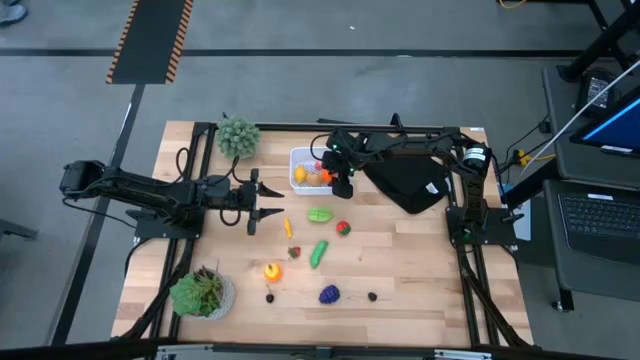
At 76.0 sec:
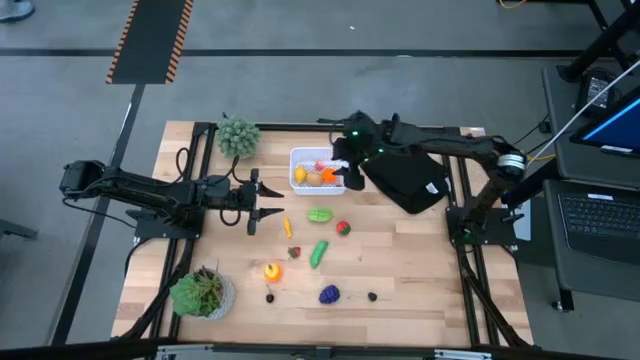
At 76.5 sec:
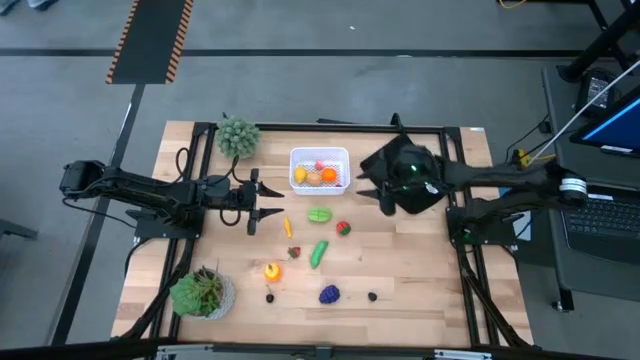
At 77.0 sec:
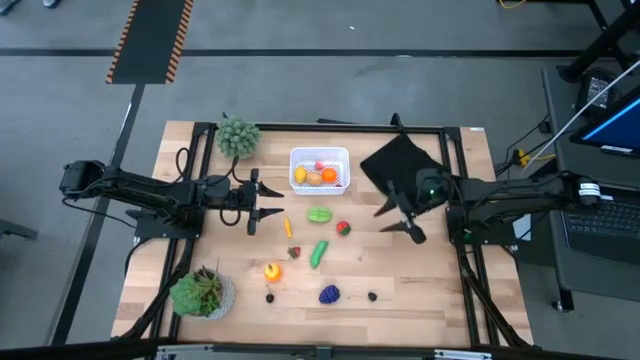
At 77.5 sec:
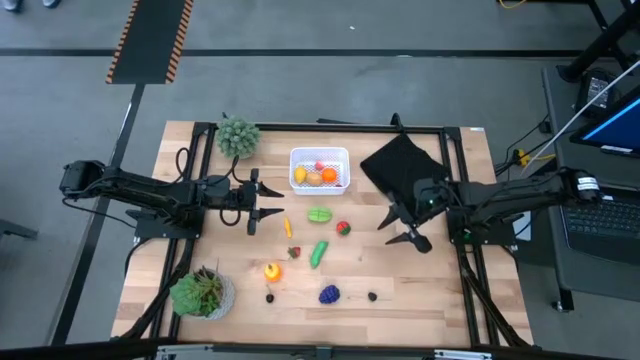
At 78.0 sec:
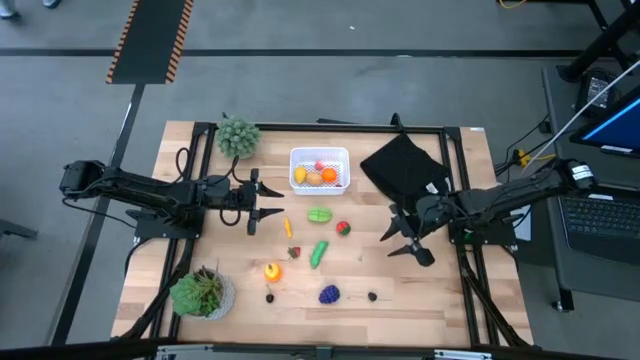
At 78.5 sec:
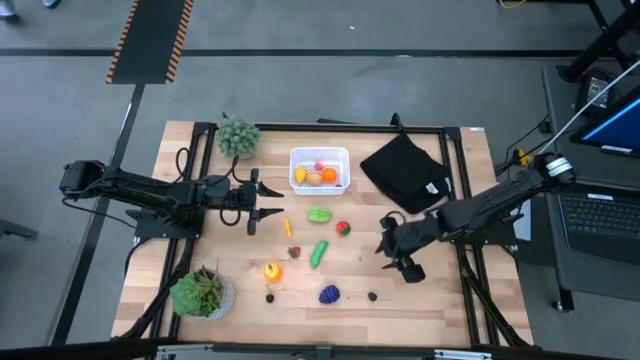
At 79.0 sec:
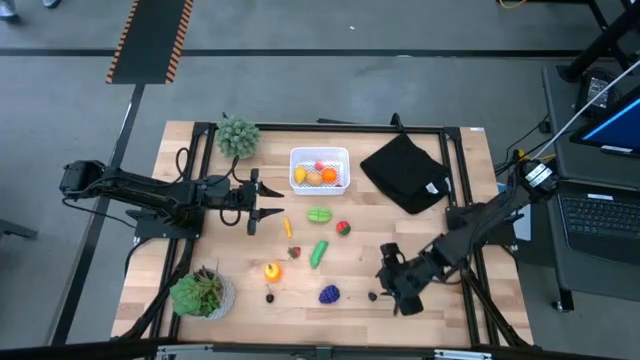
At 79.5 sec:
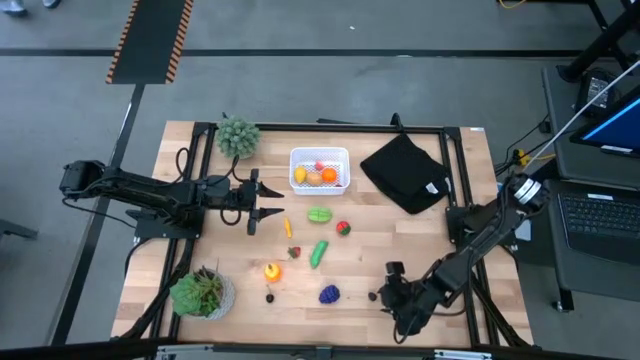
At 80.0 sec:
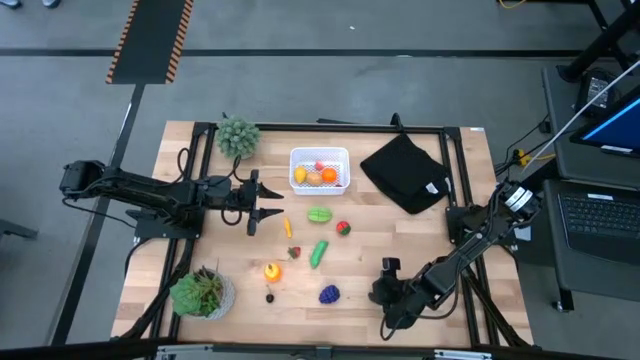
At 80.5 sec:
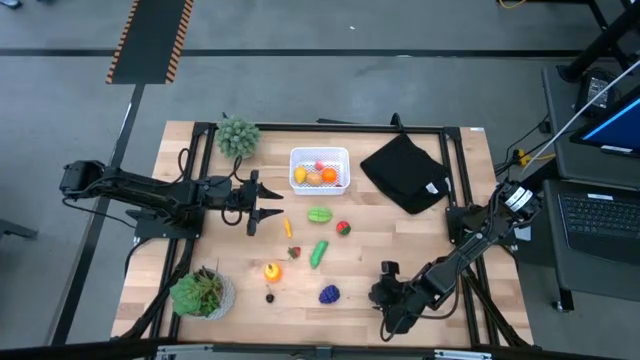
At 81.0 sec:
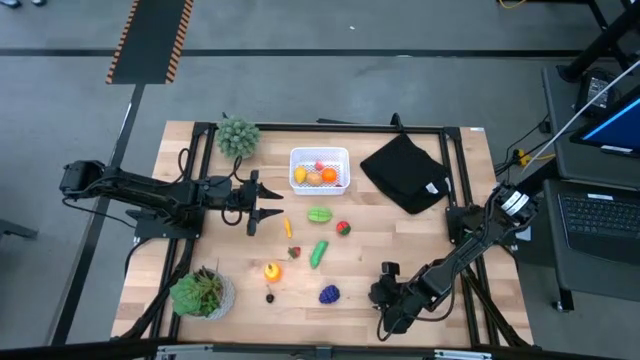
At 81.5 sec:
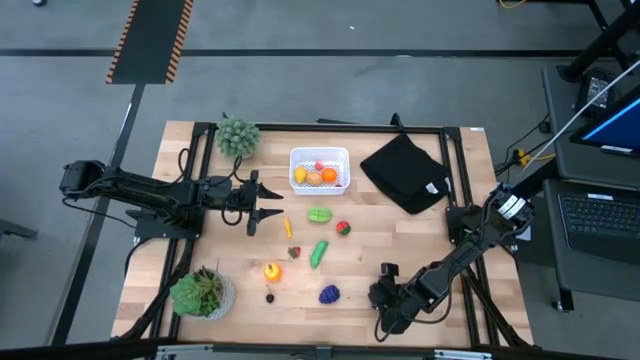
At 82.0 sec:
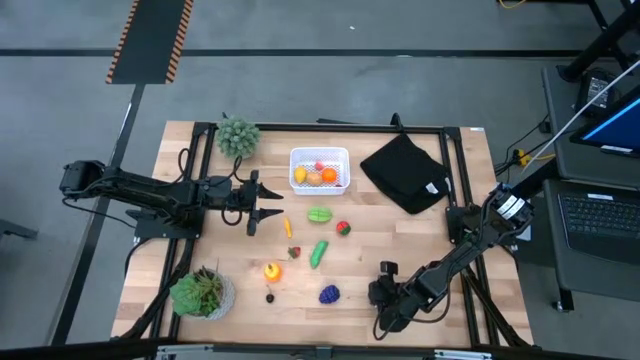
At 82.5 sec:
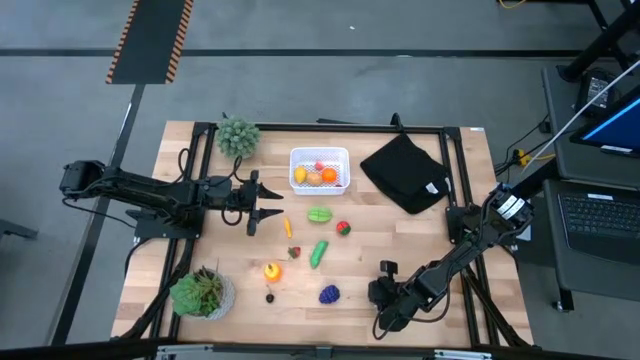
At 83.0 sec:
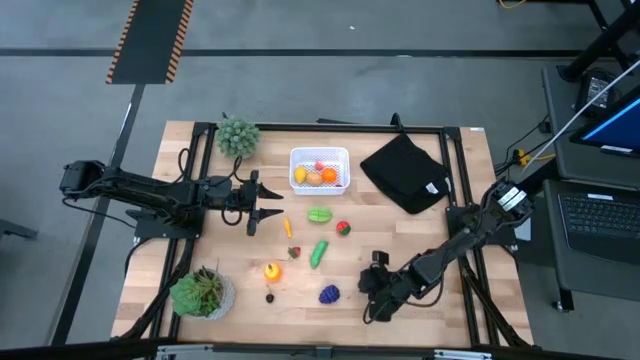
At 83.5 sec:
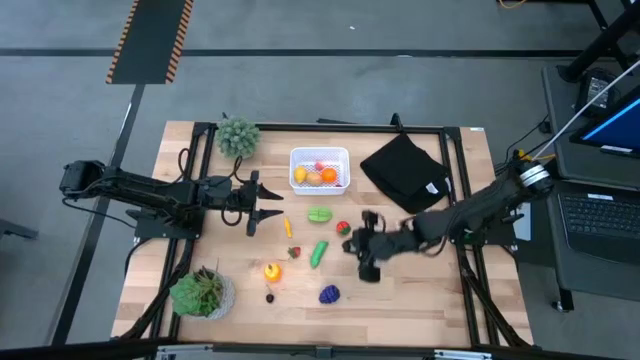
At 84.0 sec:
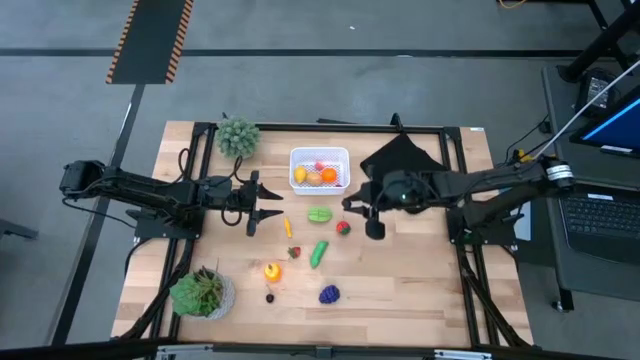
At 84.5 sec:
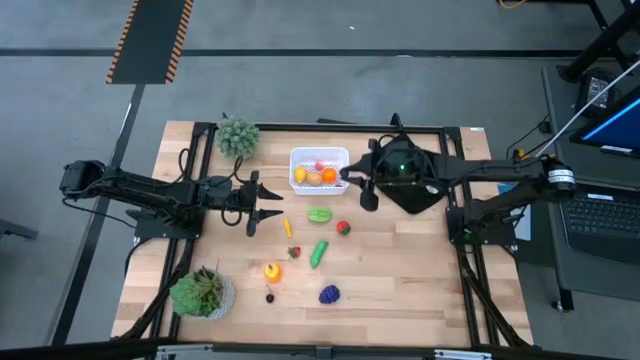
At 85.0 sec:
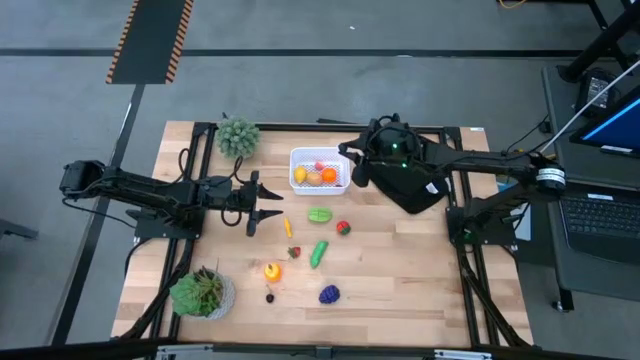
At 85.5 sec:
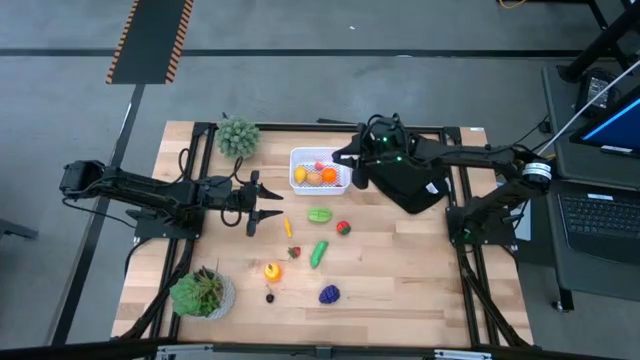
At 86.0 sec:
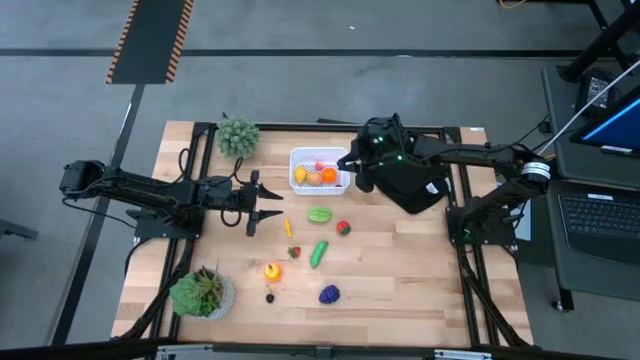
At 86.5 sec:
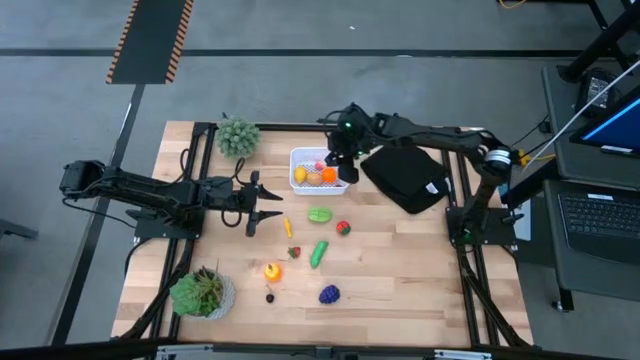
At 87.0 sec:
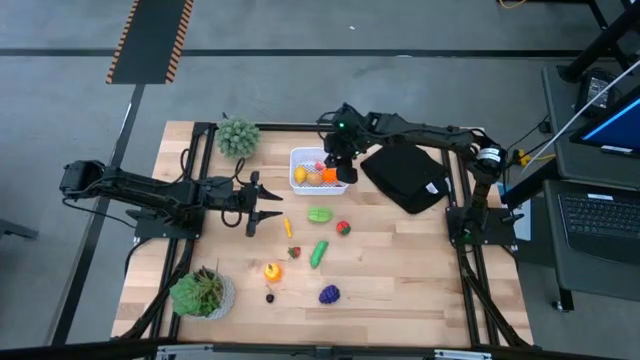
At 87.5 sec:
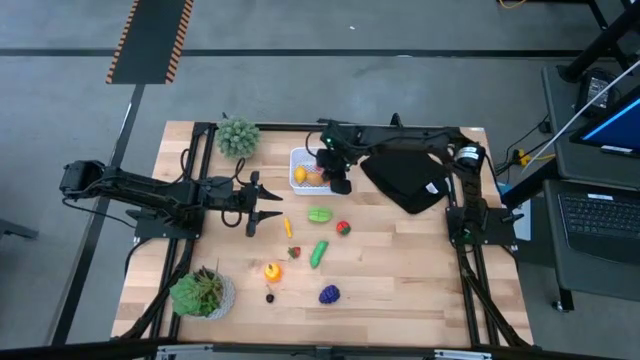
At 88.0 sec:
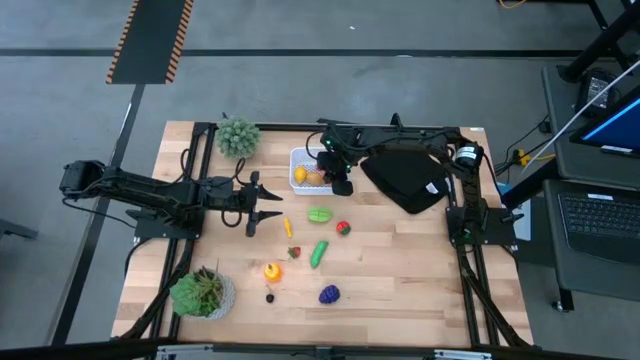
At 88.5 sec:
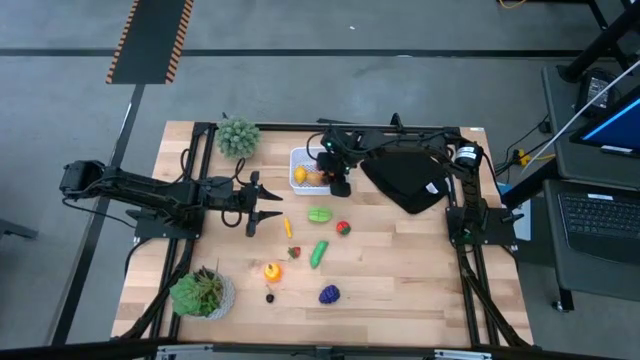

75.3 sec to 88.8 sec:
Task: Pick and placing Produce into tupperware
Put the blackberry into the white bin

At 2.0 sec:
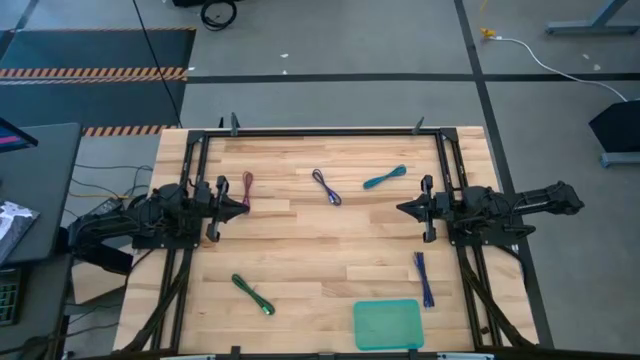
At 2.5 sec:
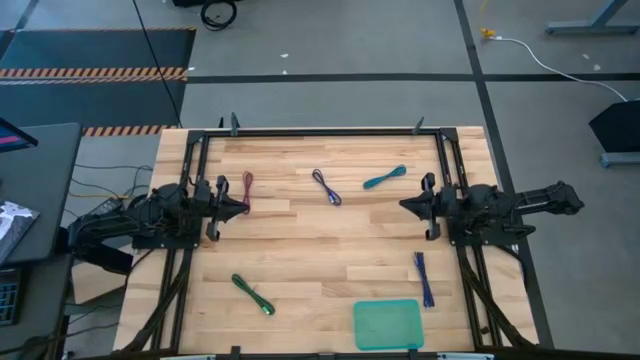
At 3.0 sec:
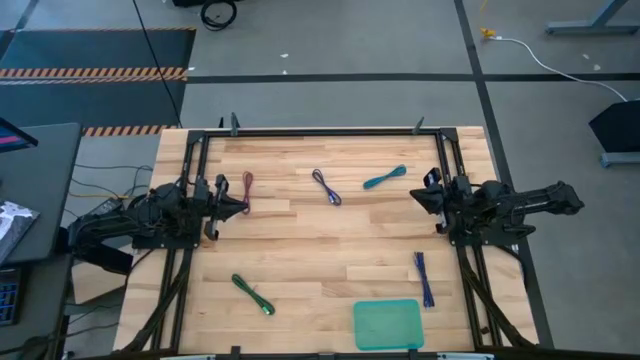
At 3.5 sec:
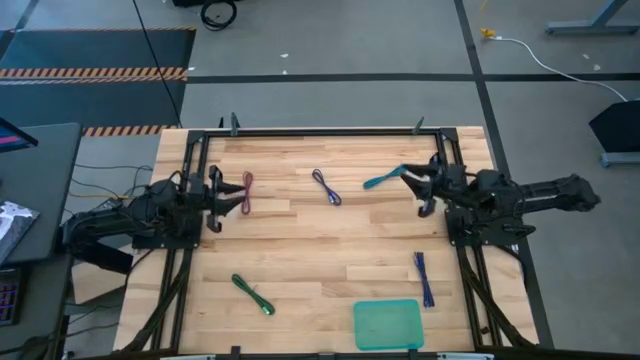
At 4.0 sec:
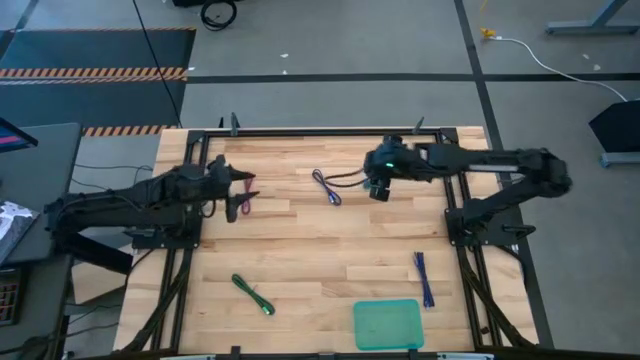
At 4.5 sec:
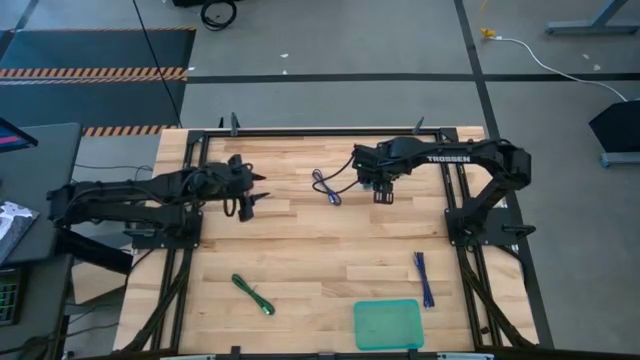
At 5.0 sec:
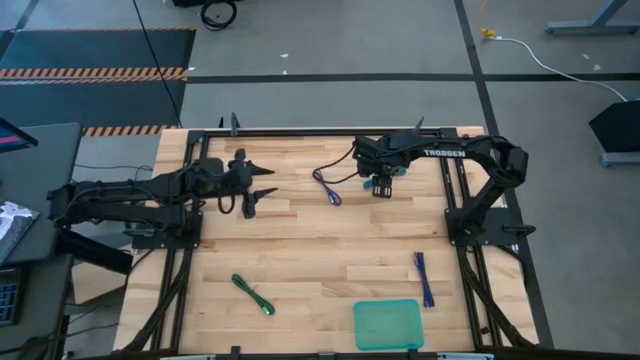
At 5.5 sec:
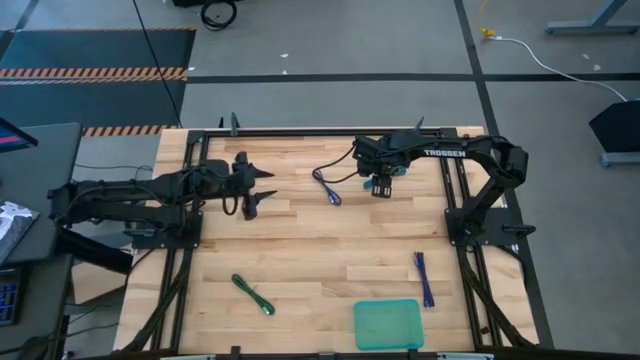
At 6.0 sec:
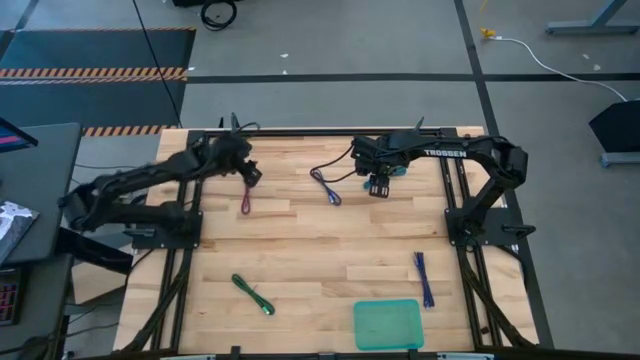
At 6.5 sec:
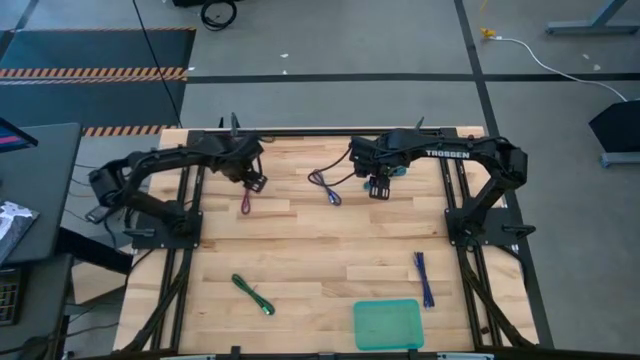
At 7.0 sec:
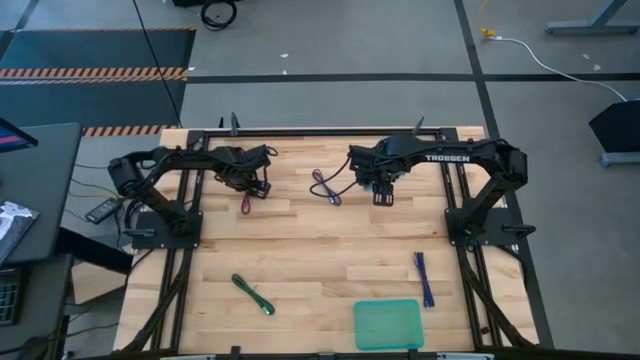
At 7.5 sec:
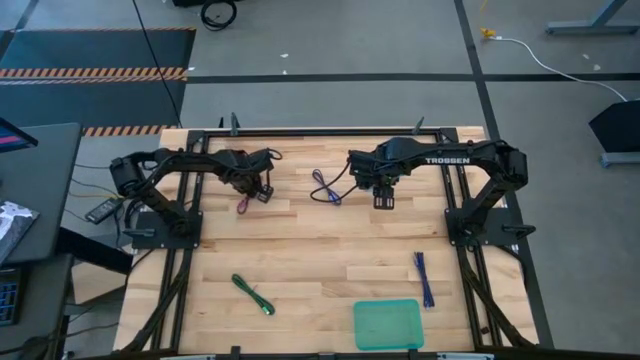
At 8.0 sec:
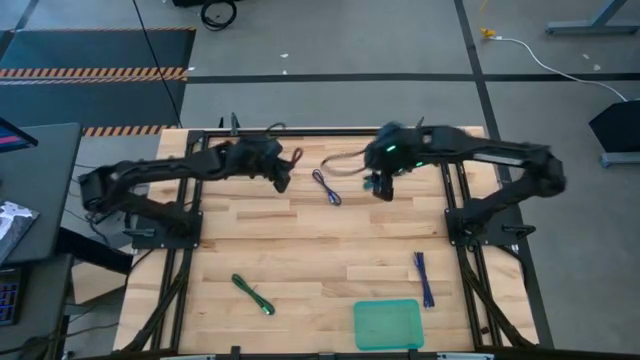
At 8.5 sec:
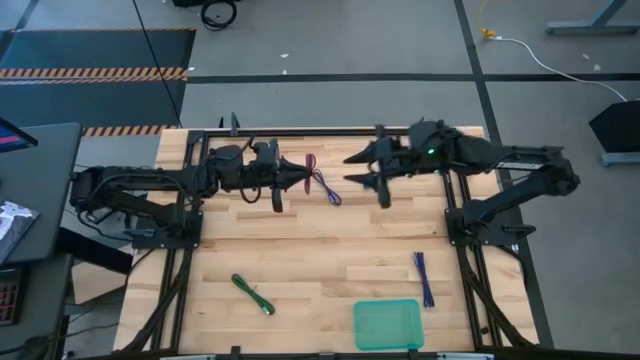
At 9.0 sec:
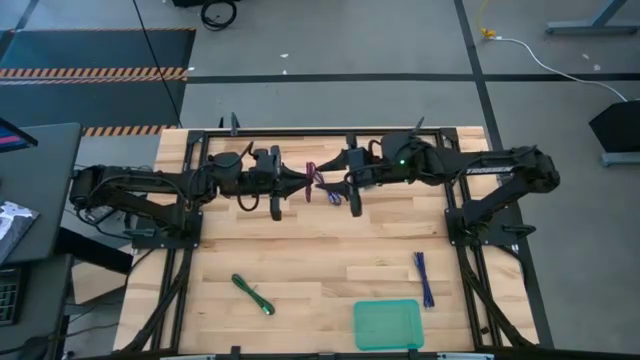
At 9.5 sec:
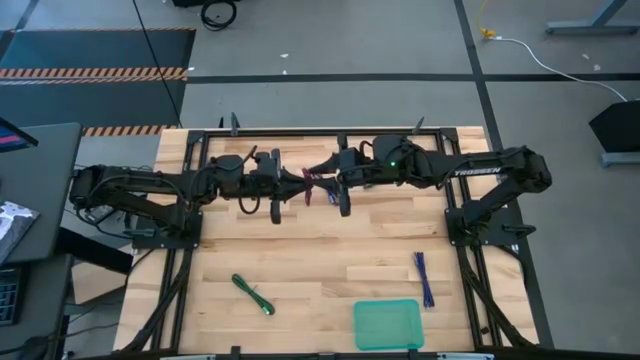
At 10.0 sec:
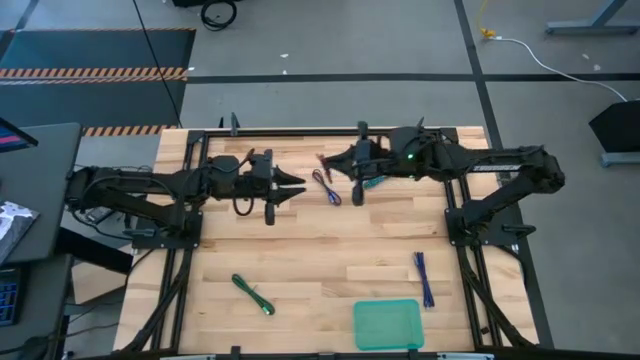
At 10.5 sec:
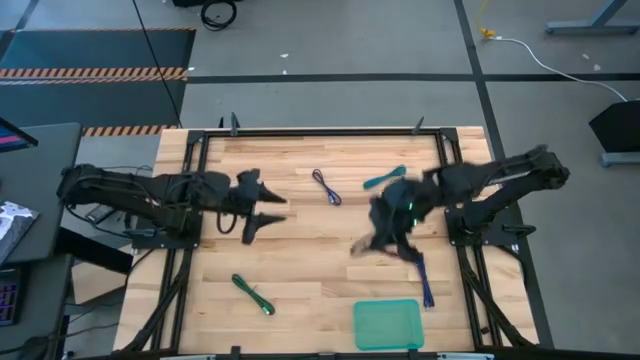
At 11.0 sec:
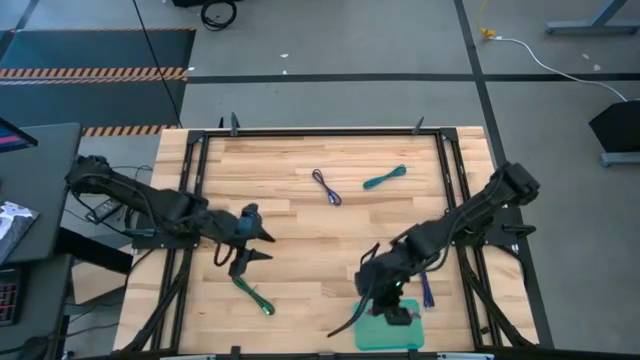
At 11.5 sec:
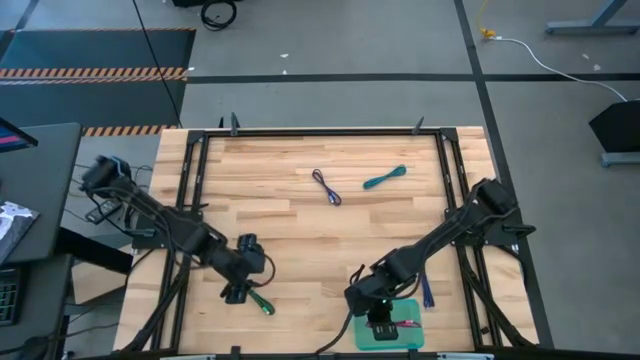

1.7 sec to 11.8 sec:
Task: Pick and place USB-C Cables
Put the pink charger cable into the blue bin
